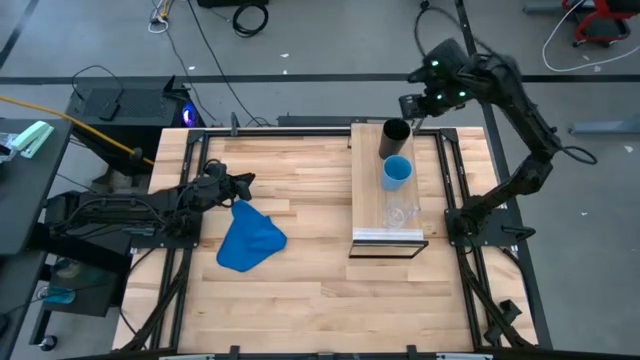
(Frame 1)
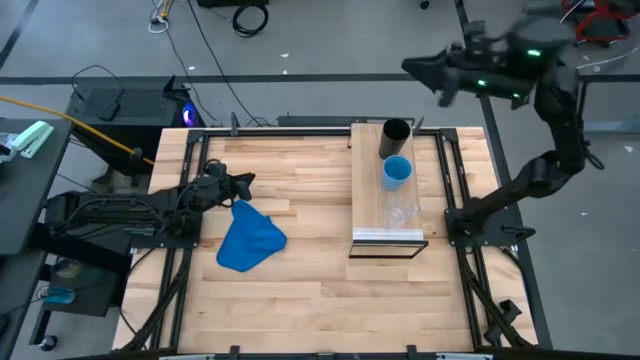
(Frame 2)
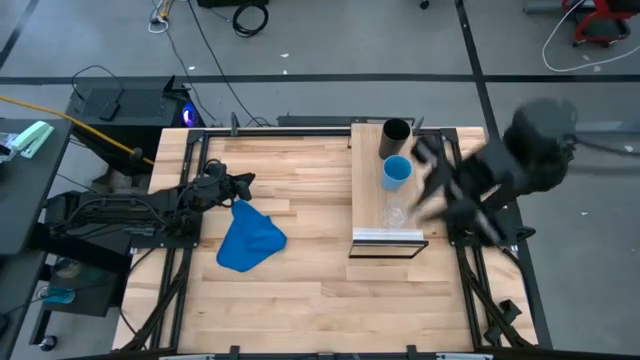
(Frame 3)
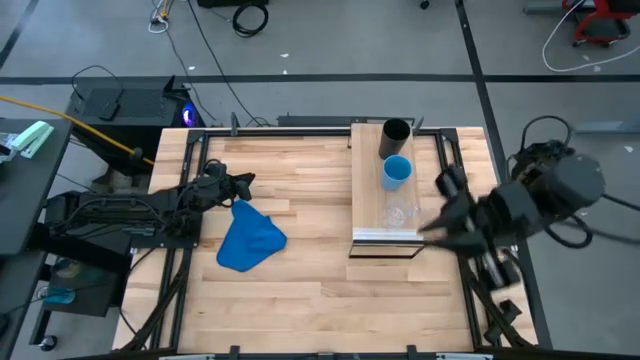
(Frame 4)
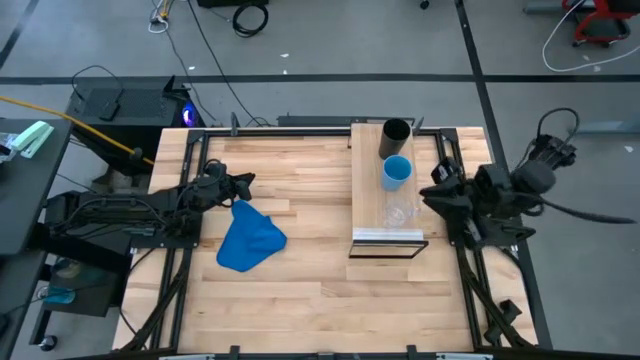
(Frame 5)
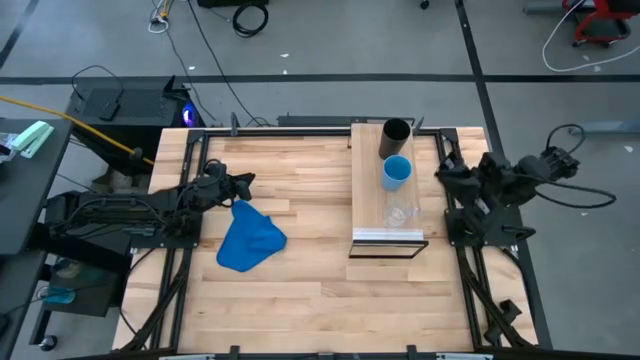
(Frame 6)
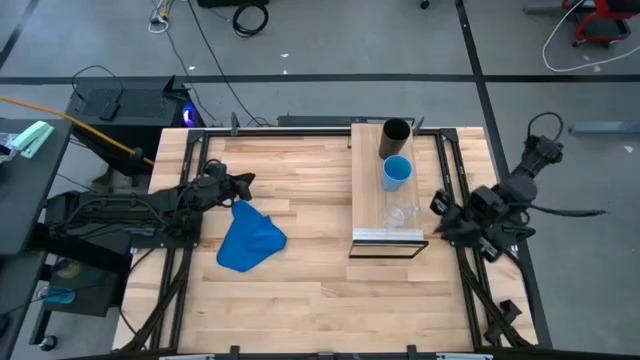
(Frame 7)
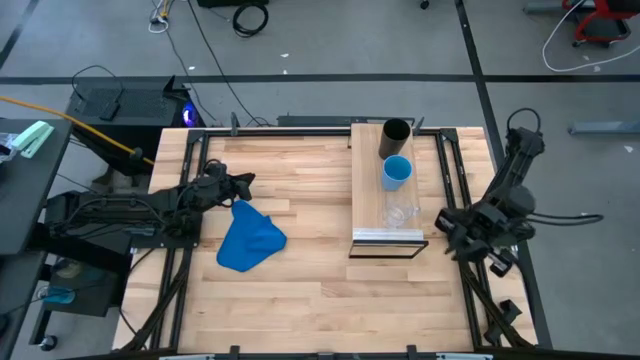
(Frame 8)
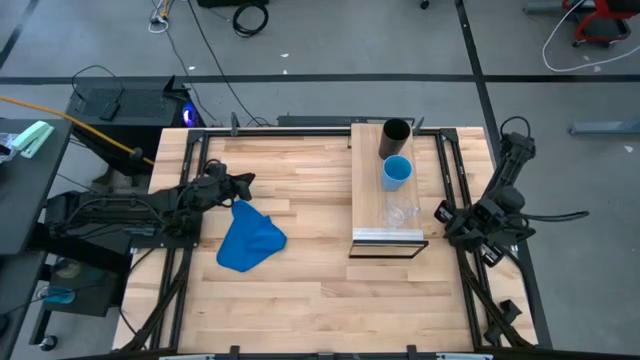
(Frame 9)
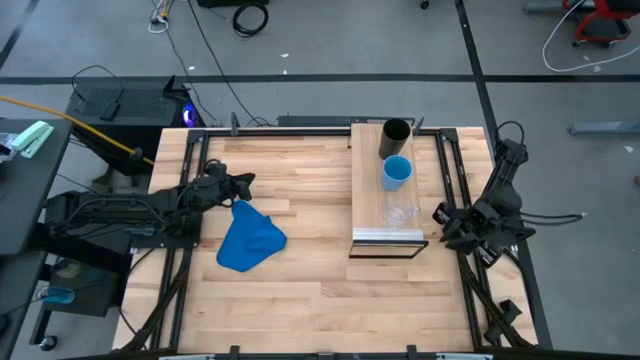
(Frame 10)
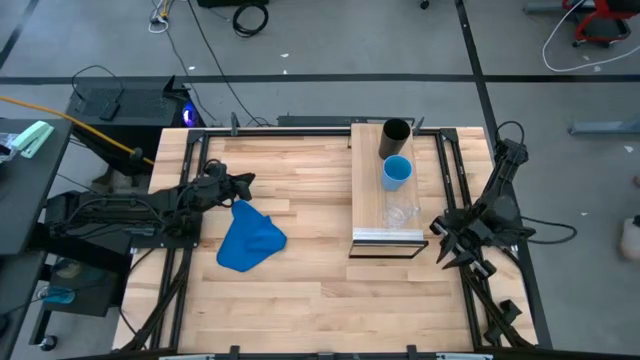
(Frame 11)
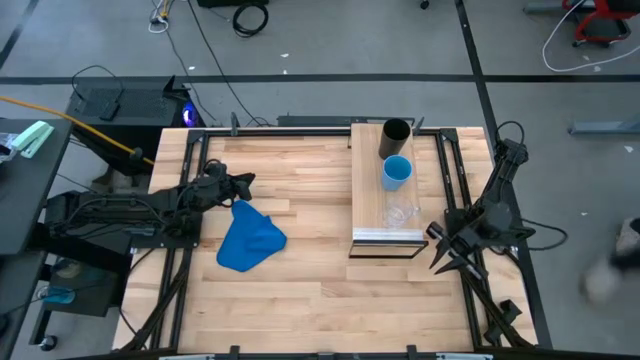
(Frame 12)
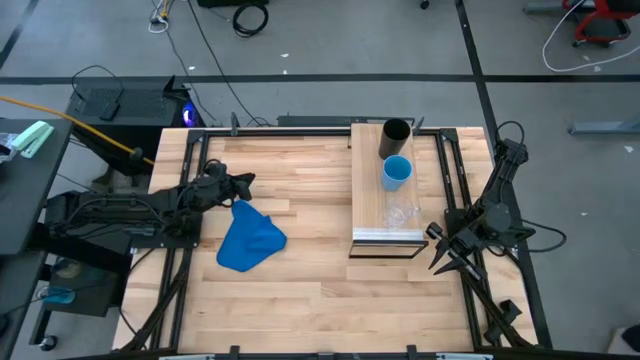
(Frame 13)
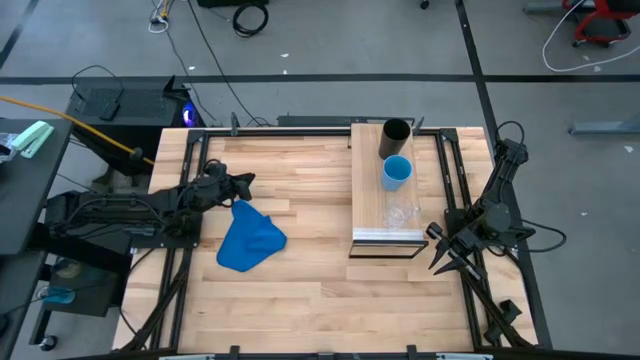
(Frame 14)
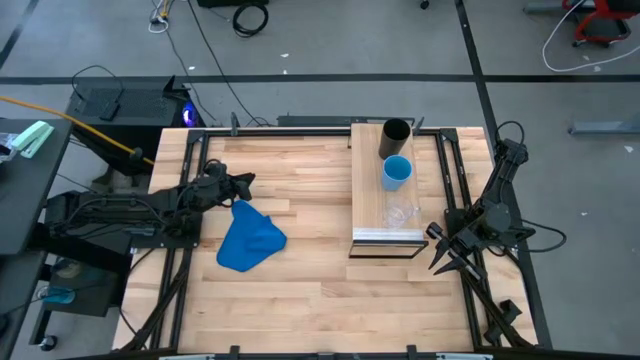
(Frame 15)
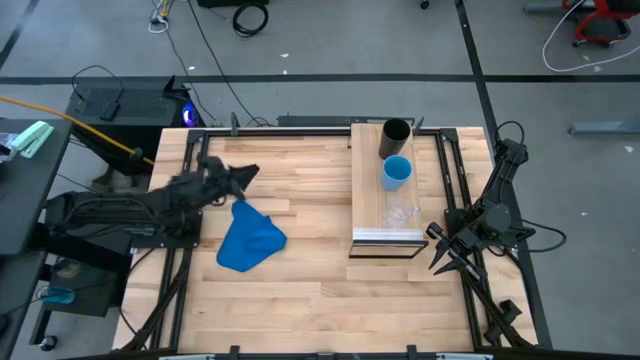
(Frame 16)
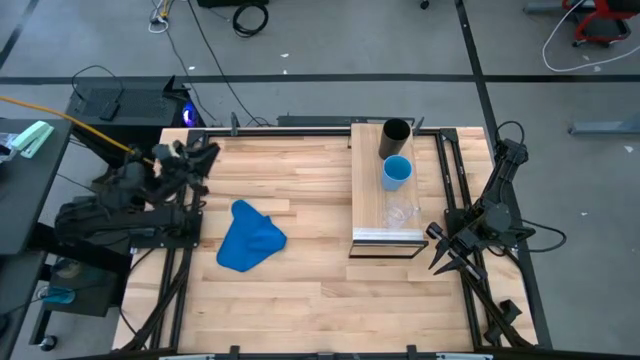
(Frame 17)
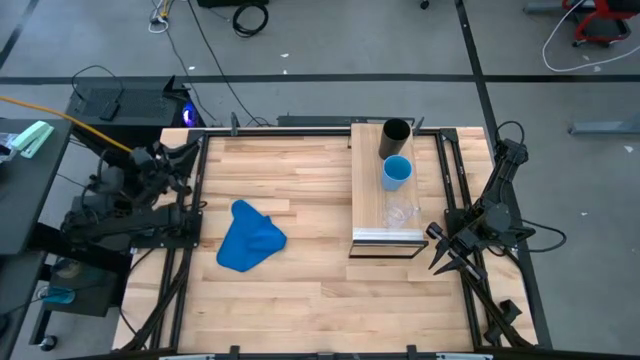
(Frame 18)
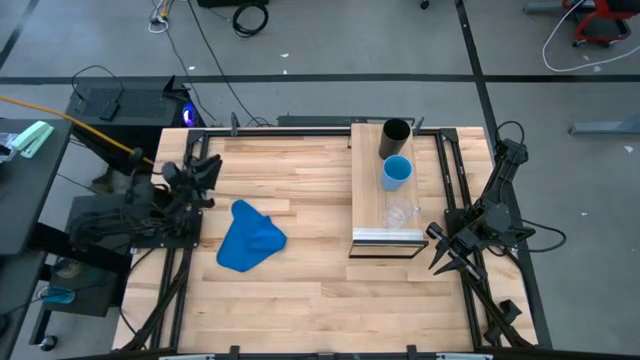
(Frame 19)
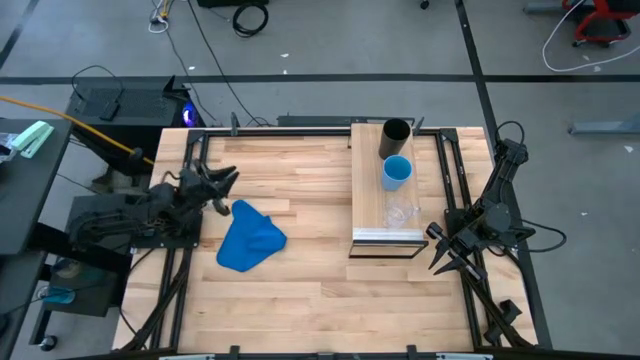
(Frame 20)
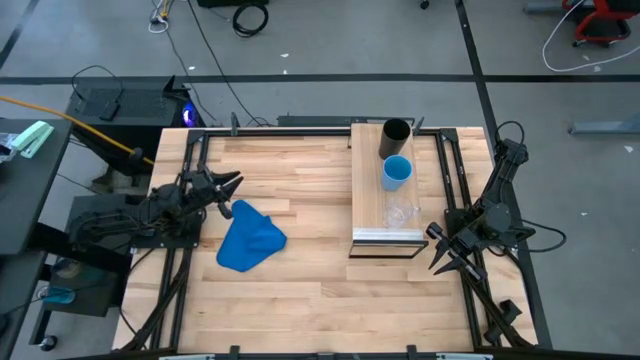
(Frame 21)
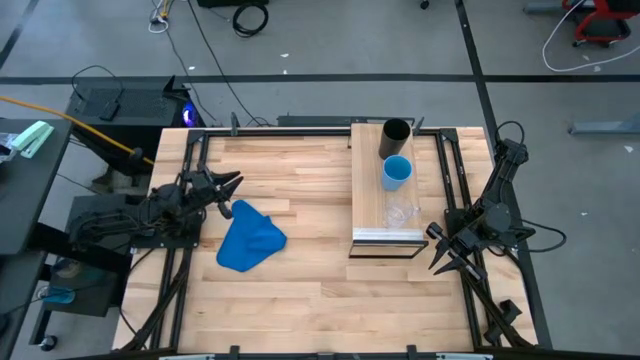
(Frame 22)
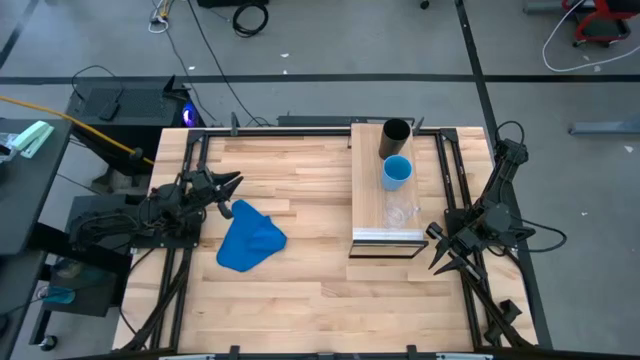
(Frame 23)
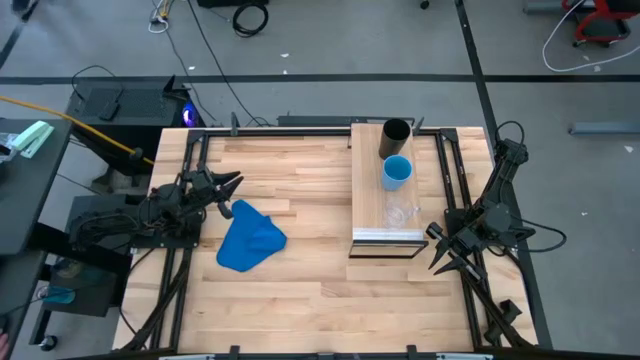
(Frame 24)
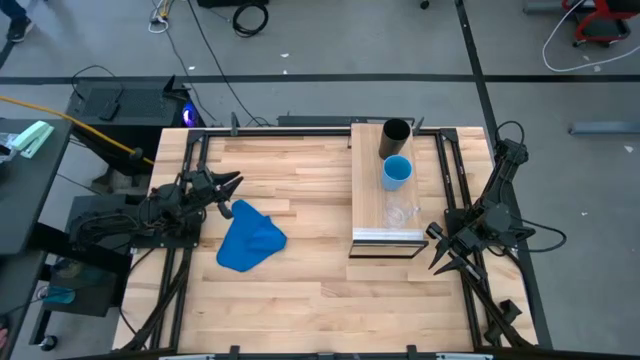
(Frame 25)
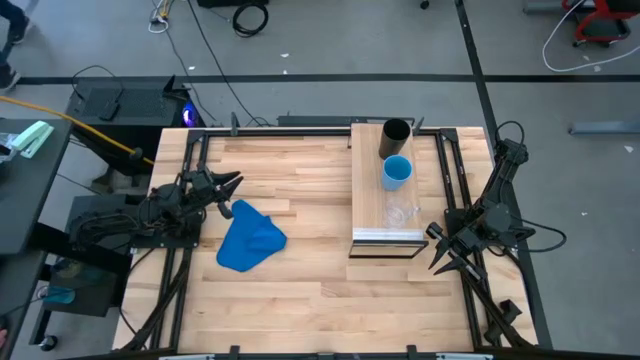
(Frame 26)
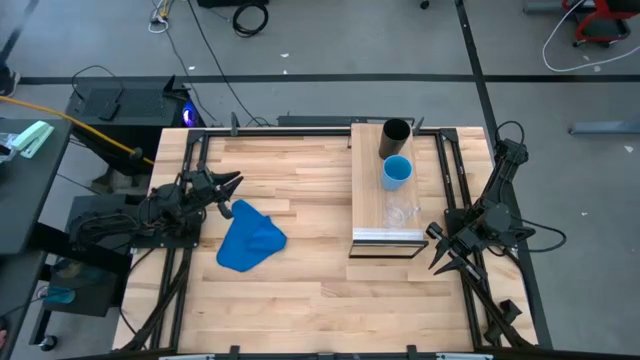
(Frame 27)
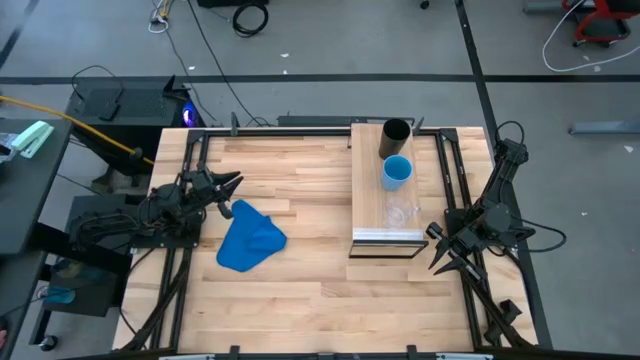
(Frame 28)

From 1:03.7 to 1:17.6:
Task: Stack small to large cups/mugs on shelf
Return to Home Position

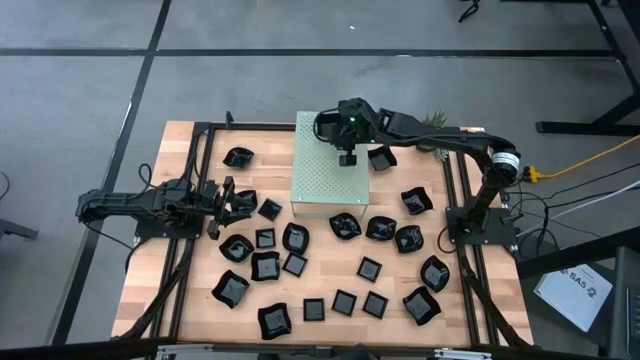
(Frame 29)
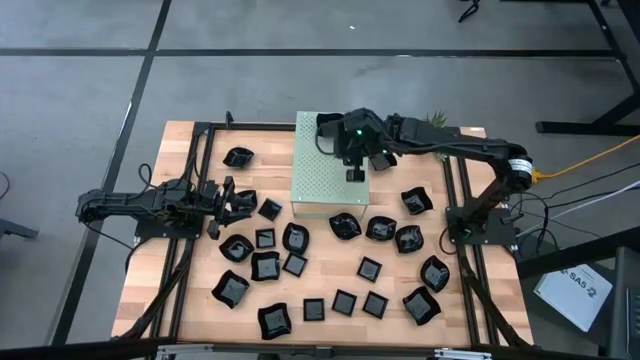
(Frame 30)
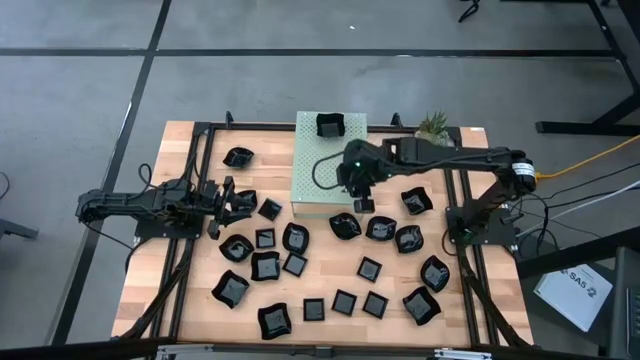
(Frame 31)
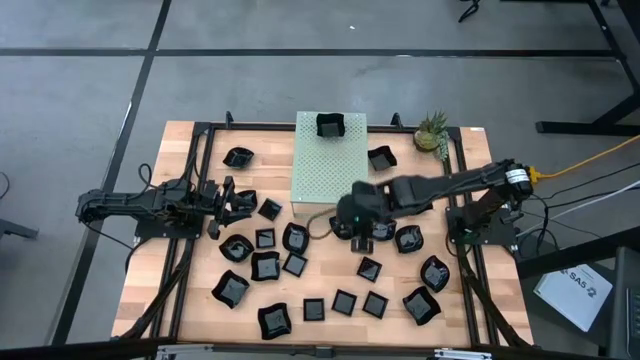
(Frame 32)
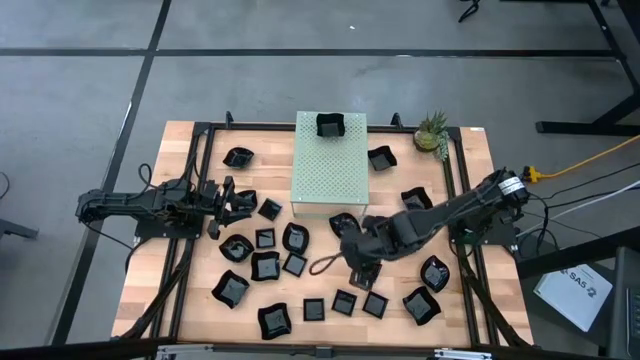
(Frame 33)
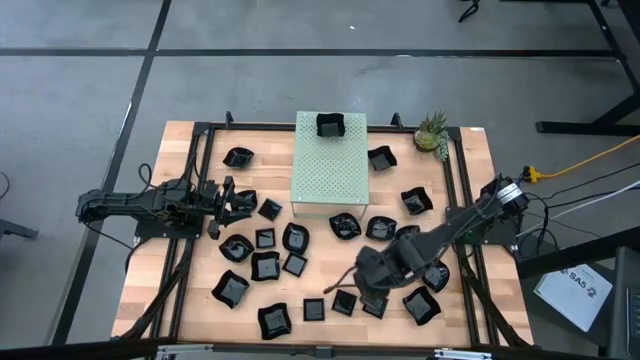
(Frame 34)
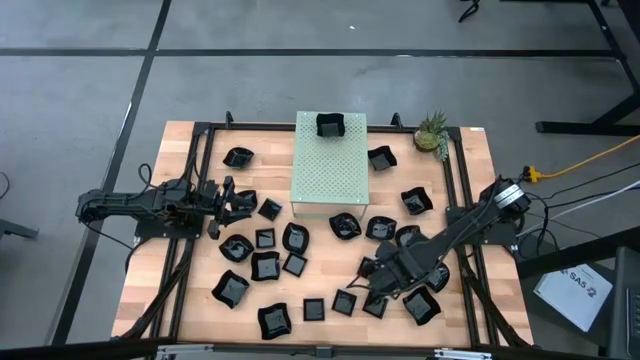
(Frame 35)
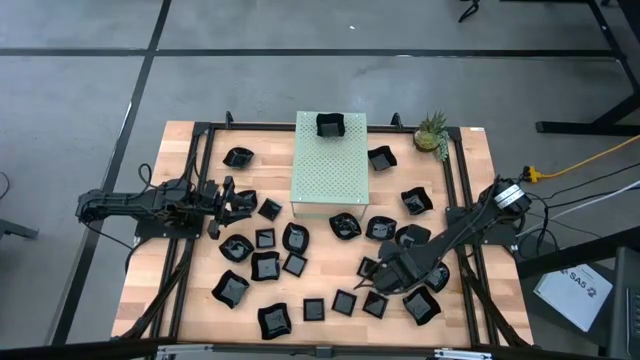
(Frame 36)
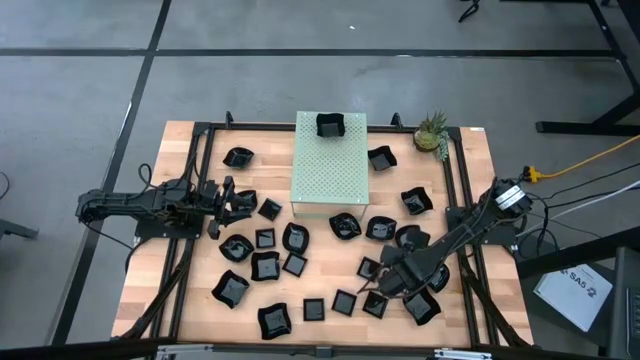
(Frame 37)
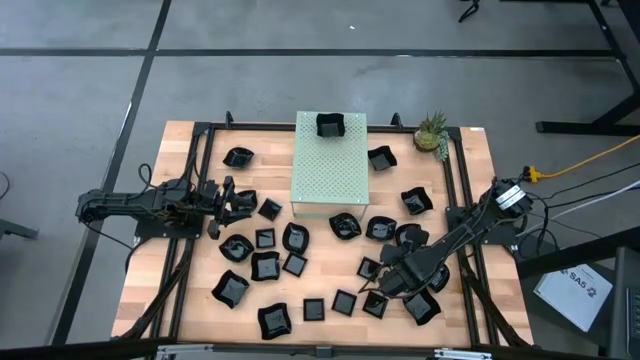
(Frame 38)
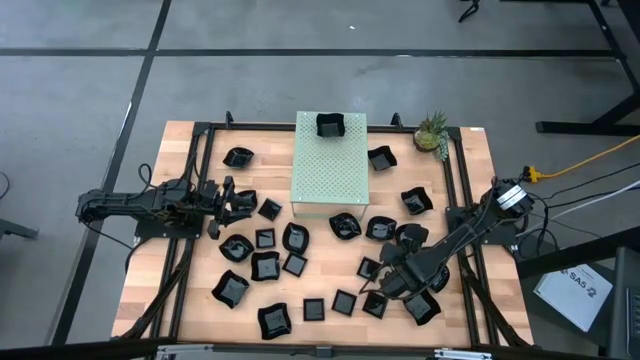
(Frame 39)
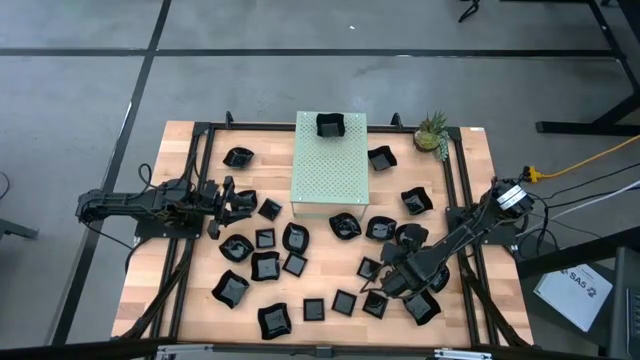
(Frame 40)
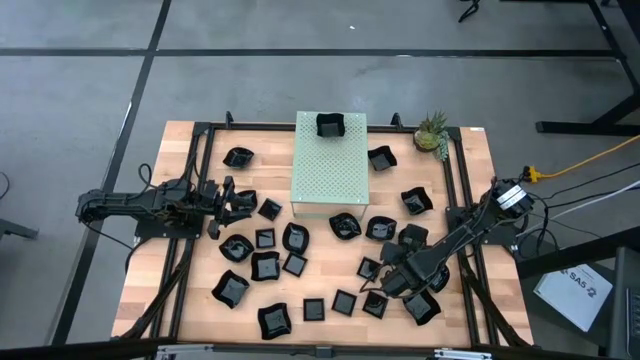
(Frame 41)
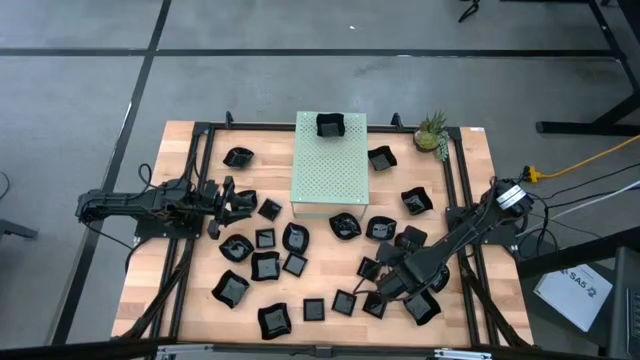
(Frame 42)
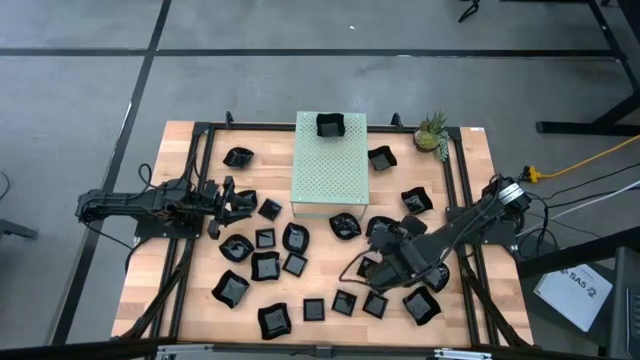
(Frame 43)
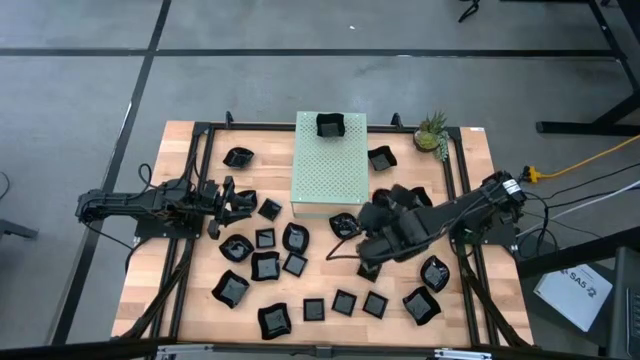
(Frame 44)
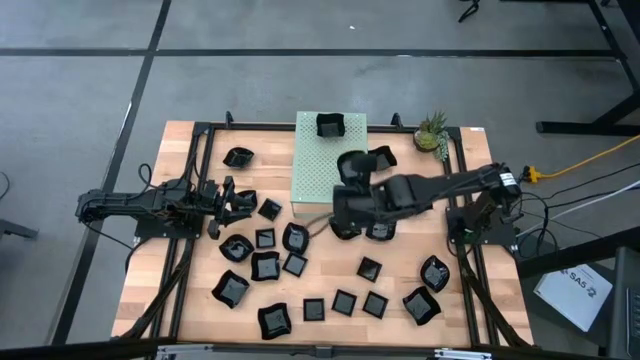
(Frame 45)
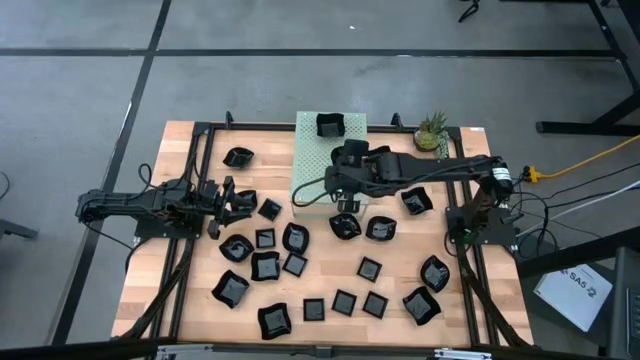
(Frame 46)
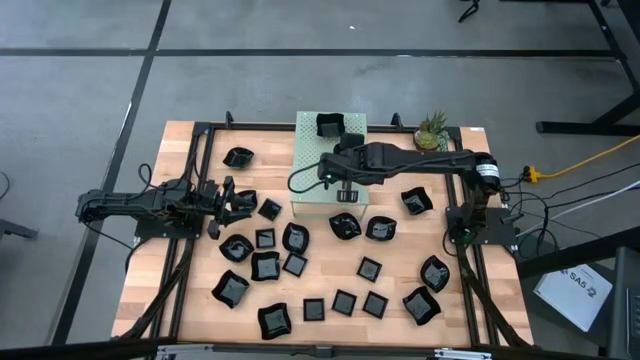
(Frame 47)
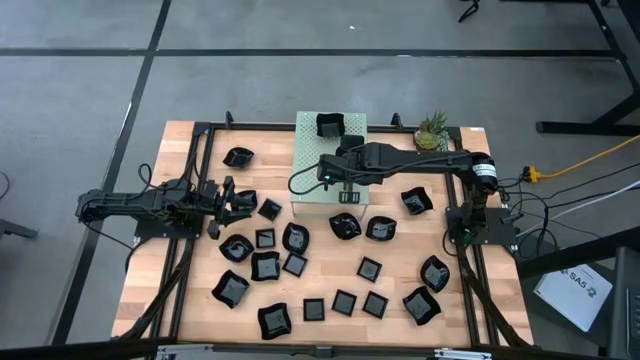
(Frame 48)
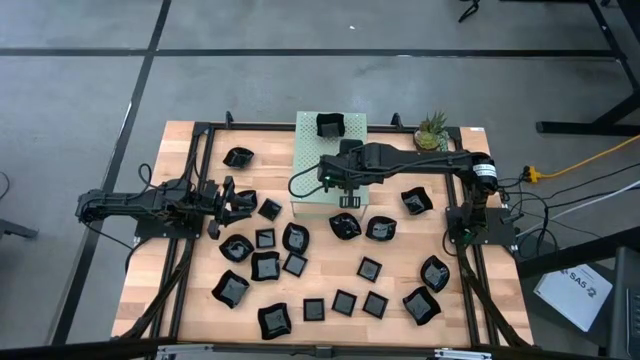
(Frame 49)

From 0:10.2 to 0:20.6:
Task: Pick & Place Mini shaped plates
Put the black leaf shaped plate on the shelf
